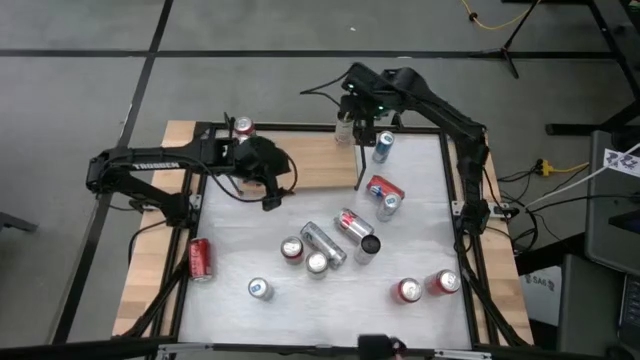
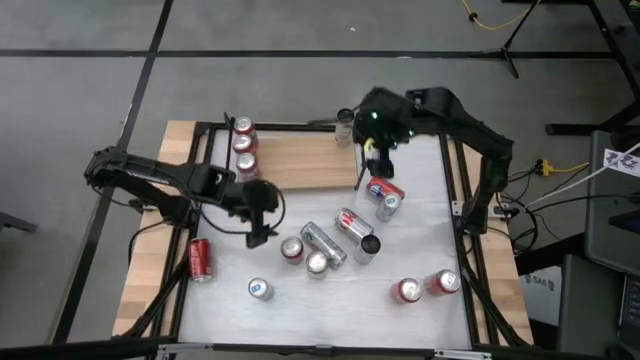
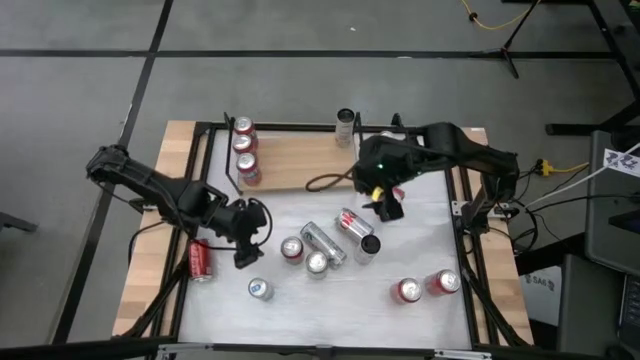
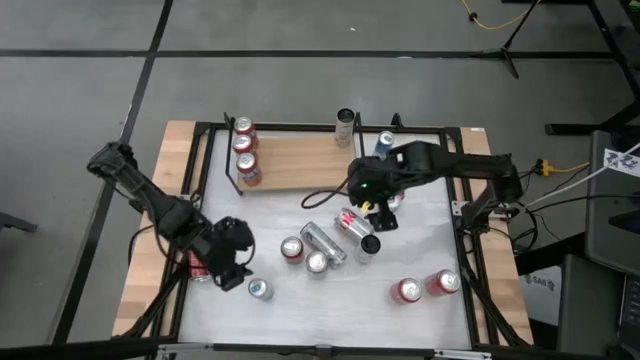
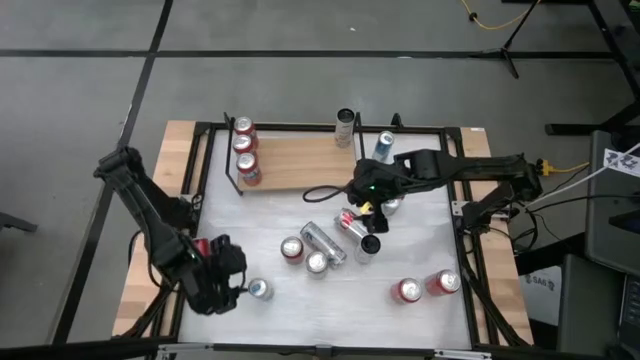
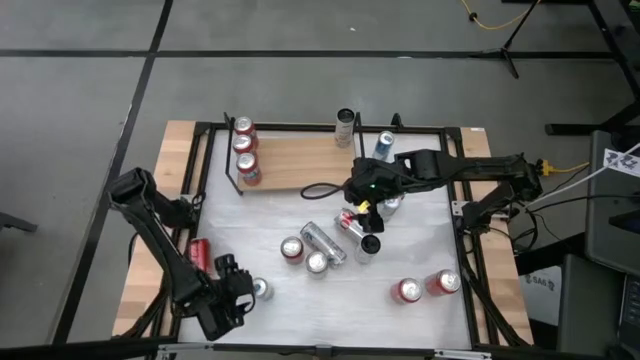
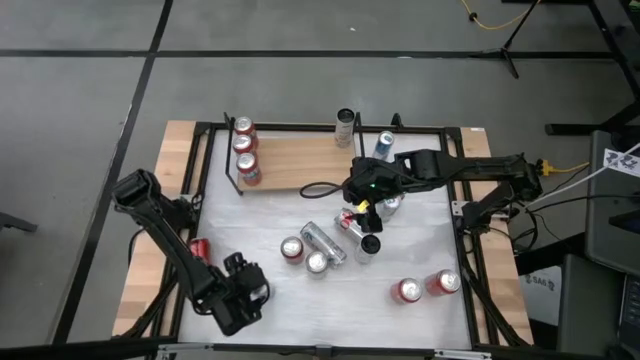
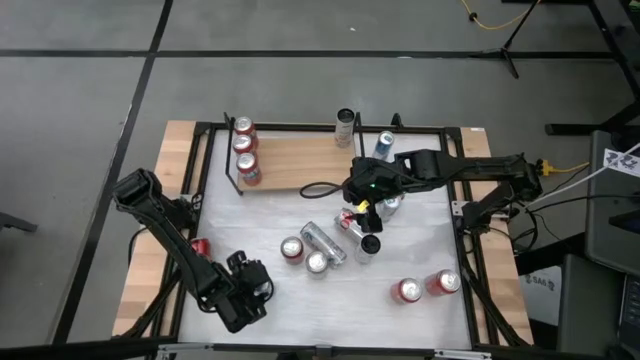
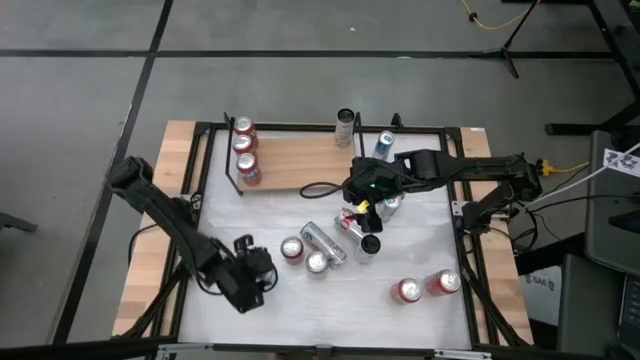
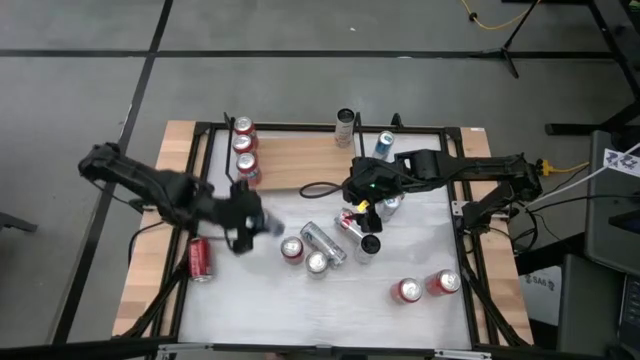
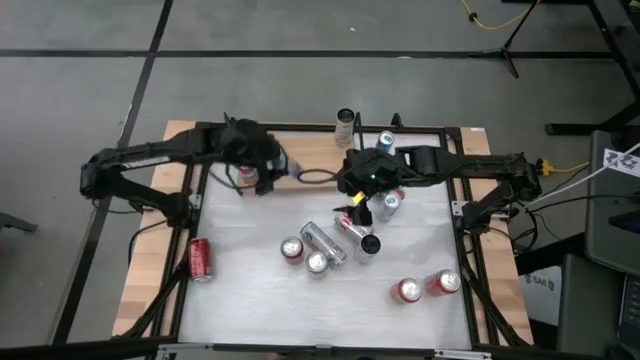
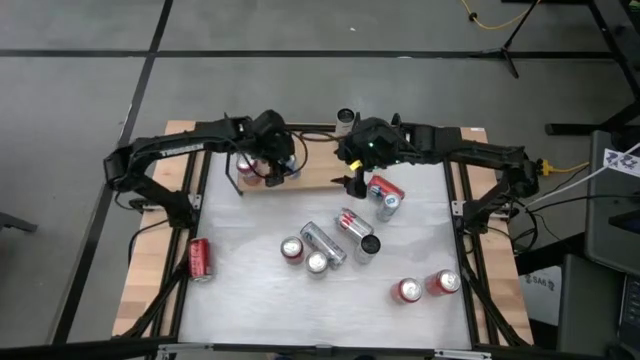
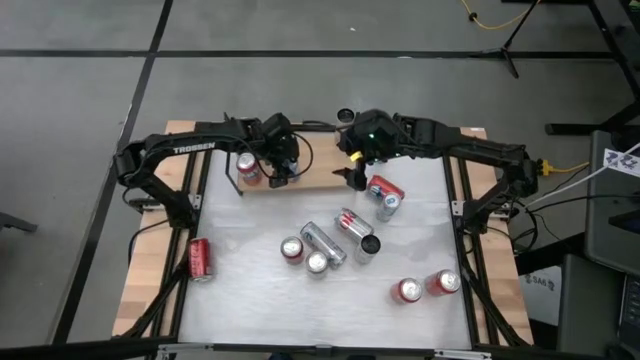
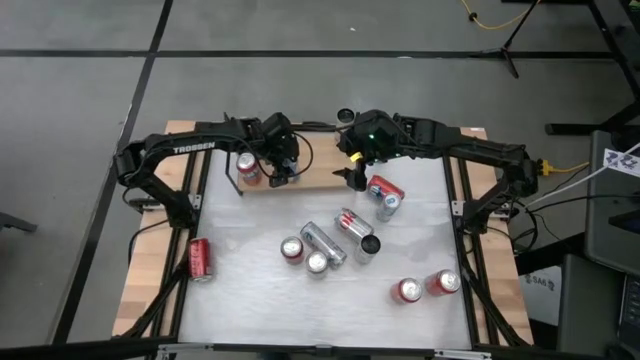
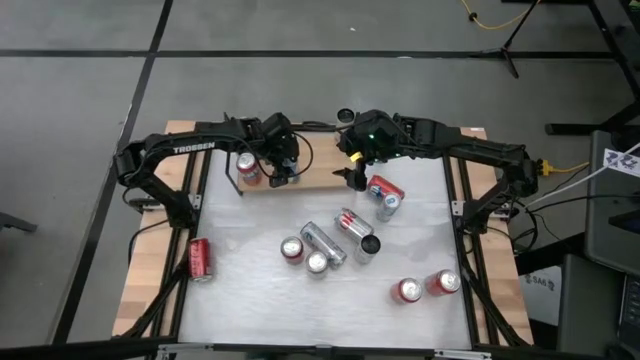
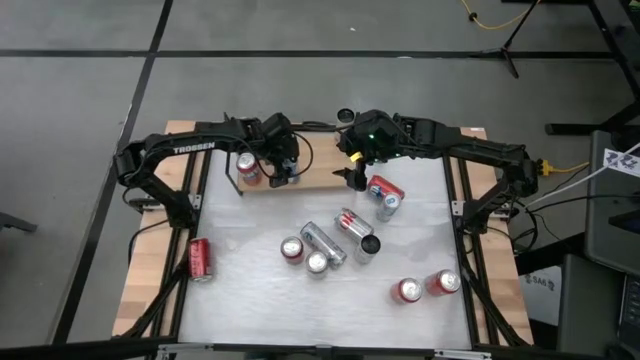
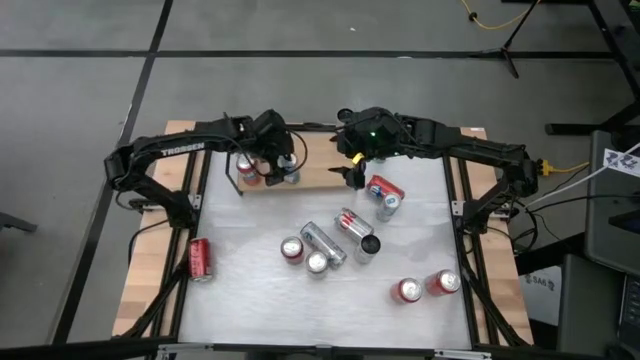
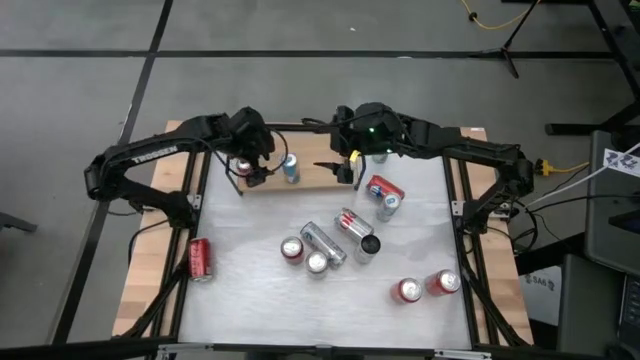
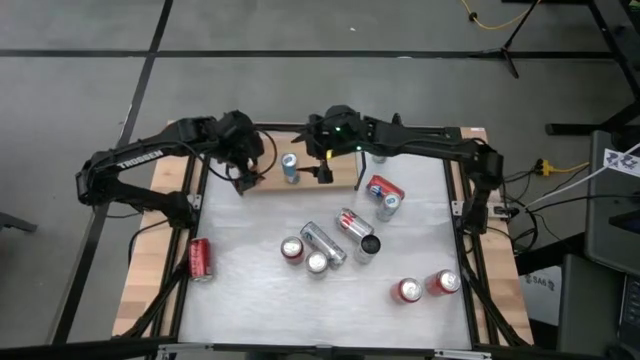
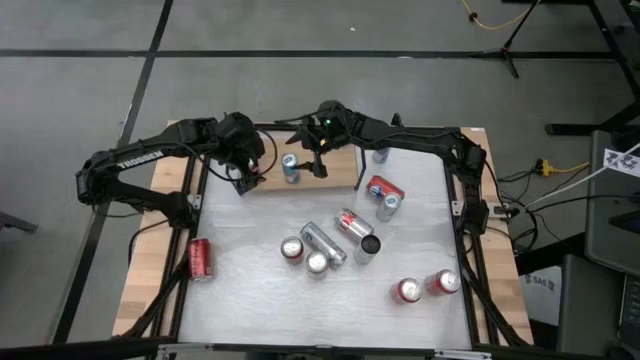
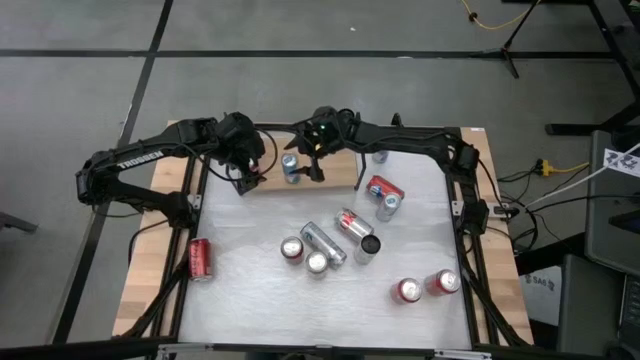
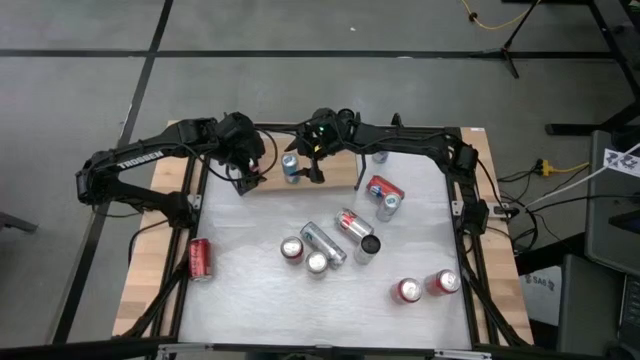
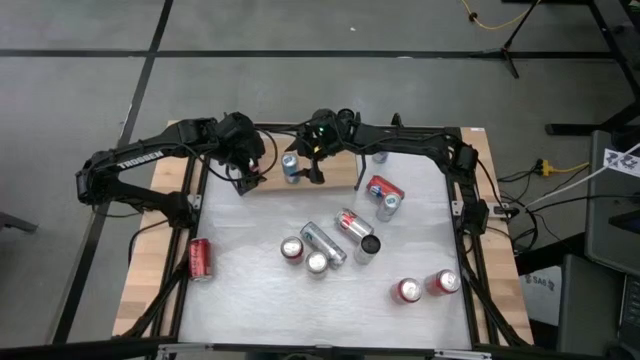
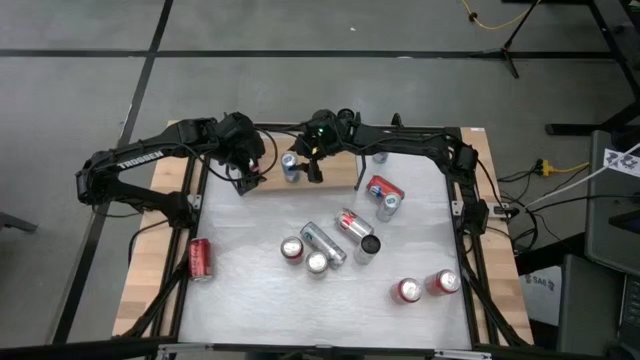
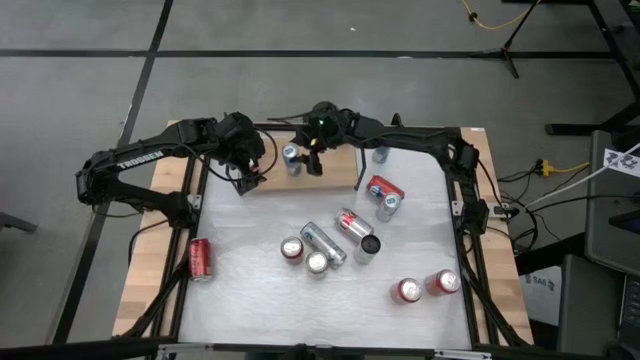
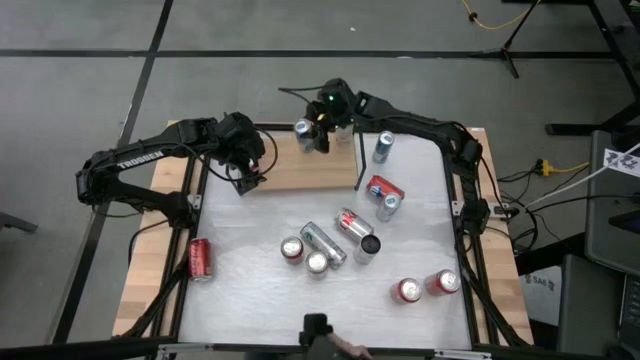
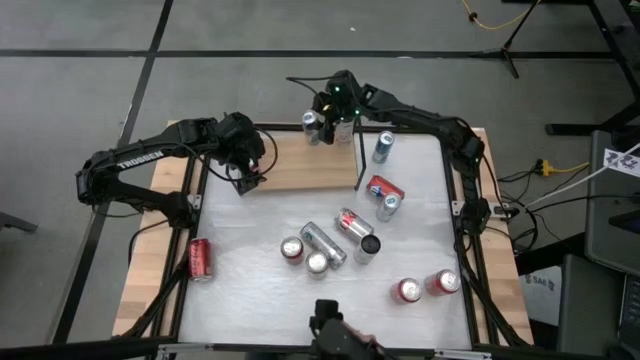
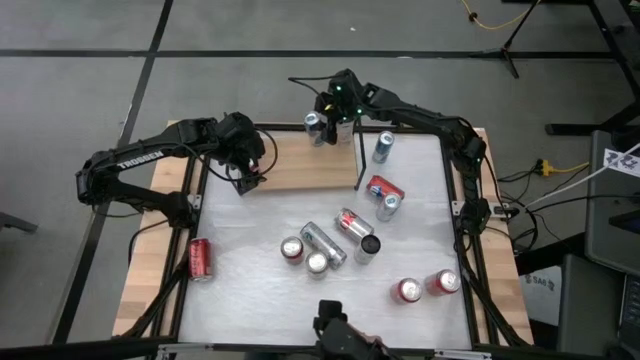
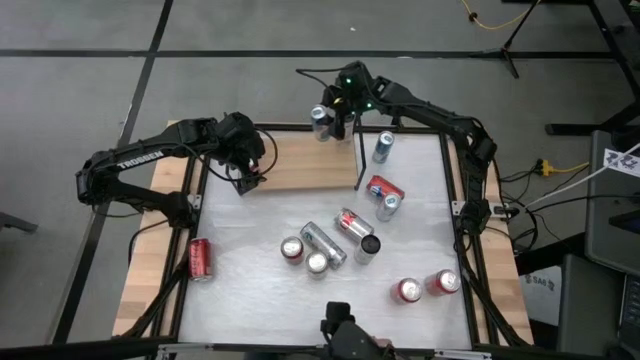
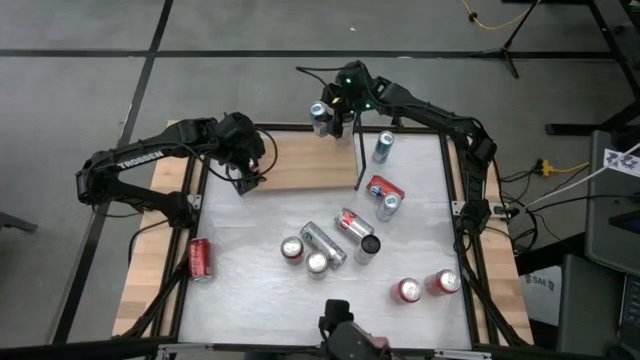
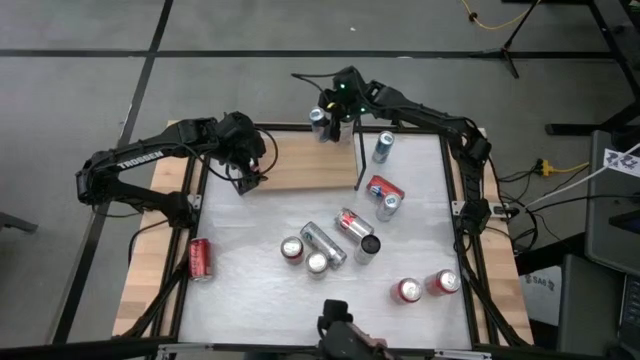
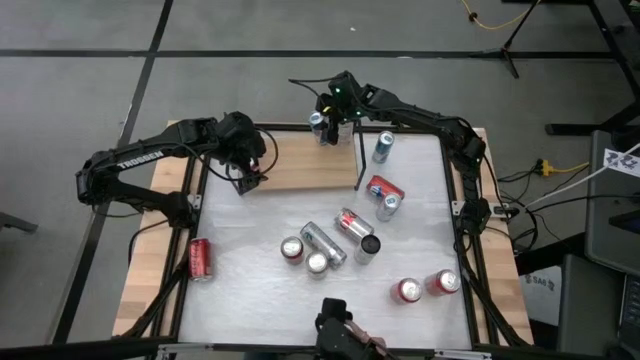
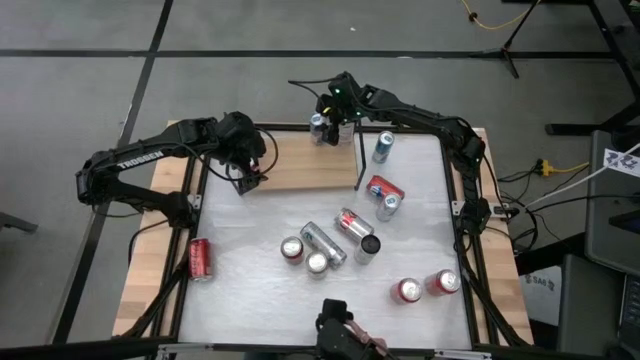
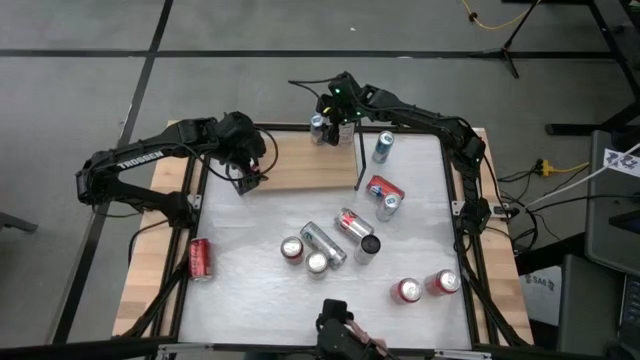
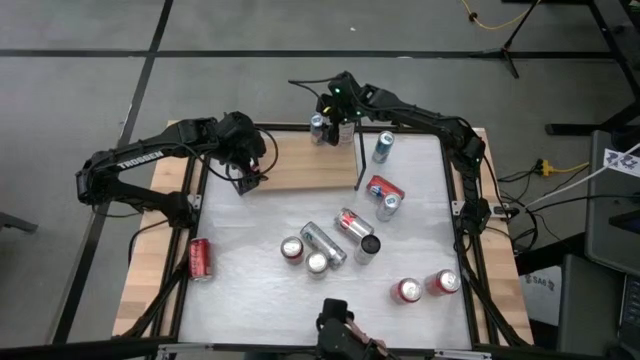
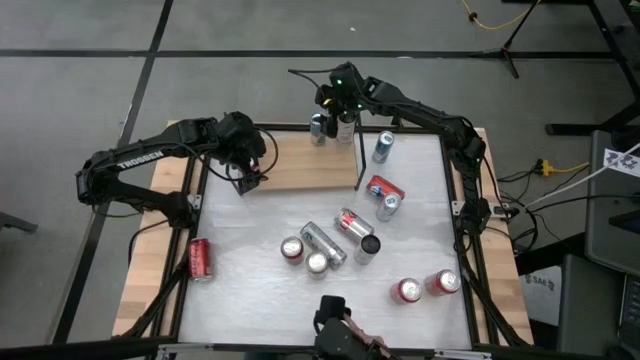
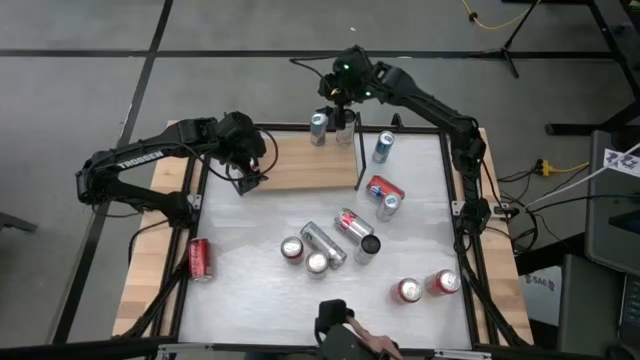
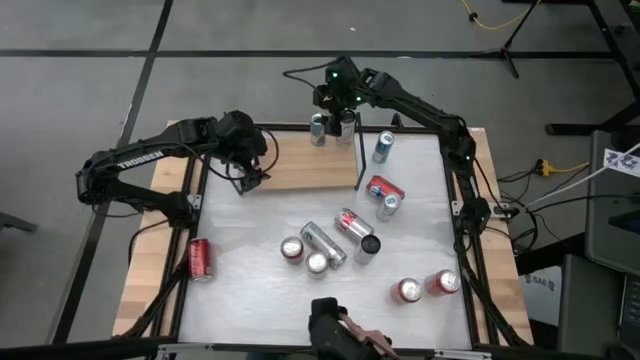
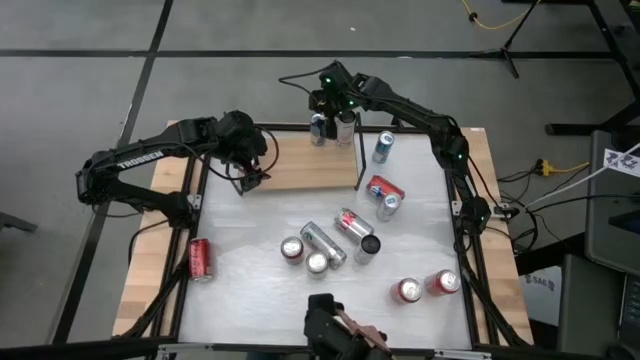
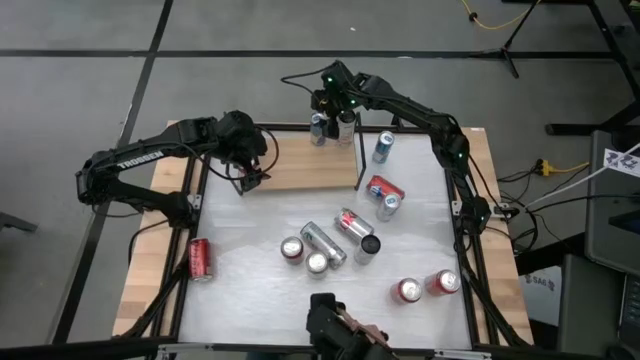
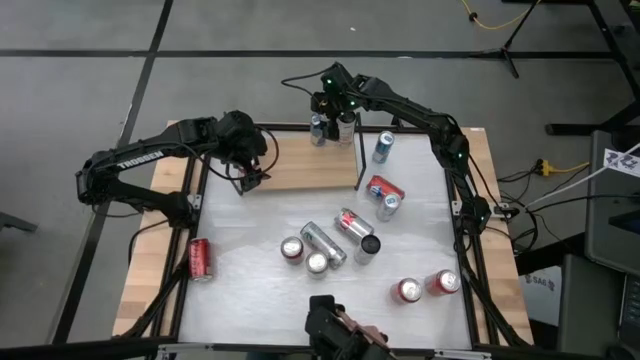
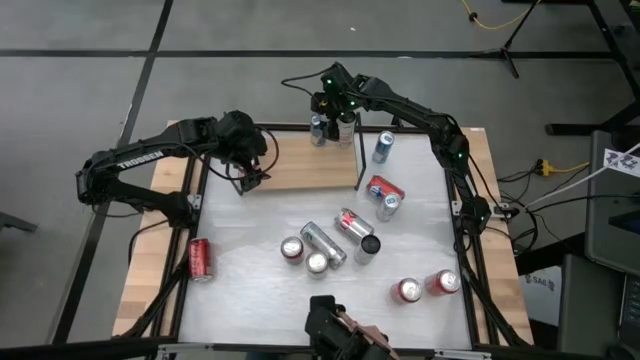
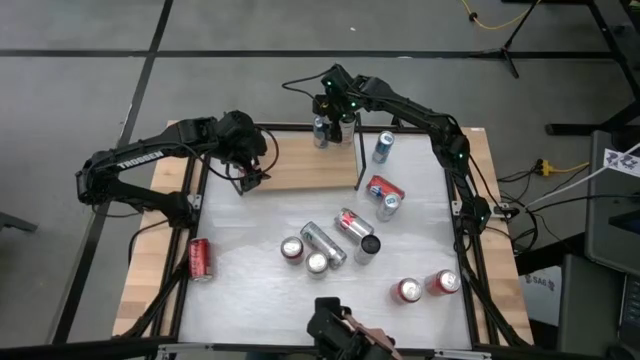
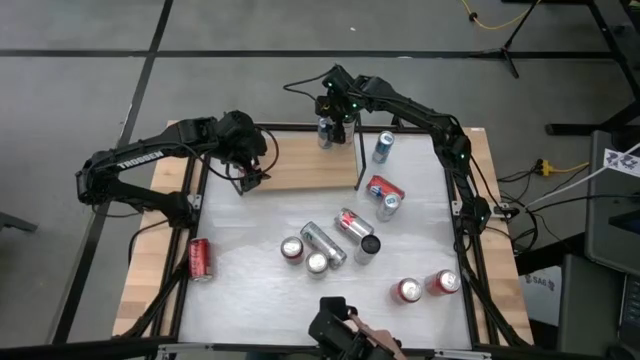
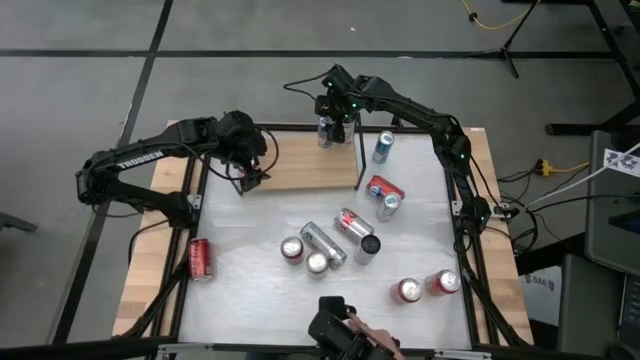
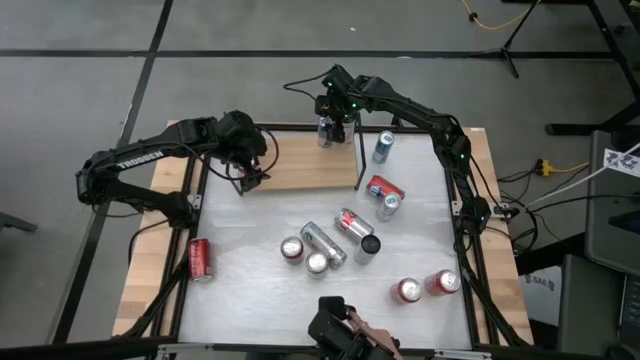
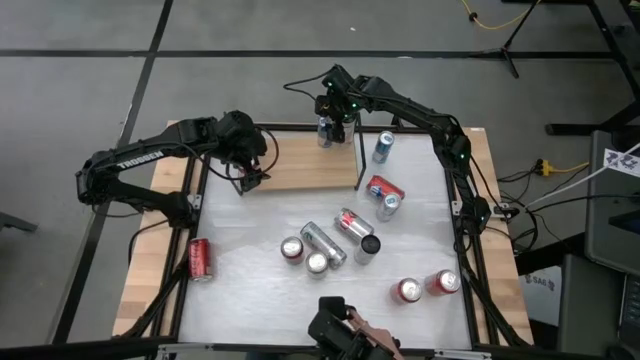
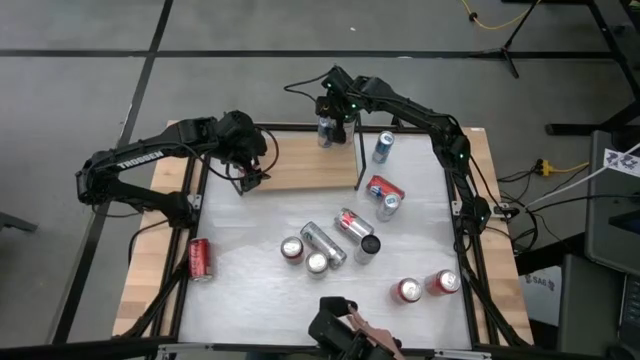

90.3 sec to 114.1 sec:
Task: Place canned beverage on shelf
Put the blue soda can on the shelf
